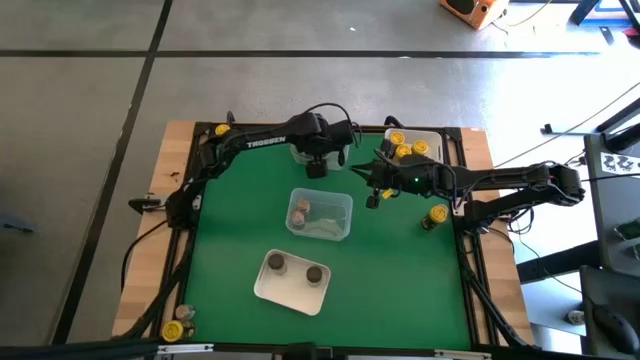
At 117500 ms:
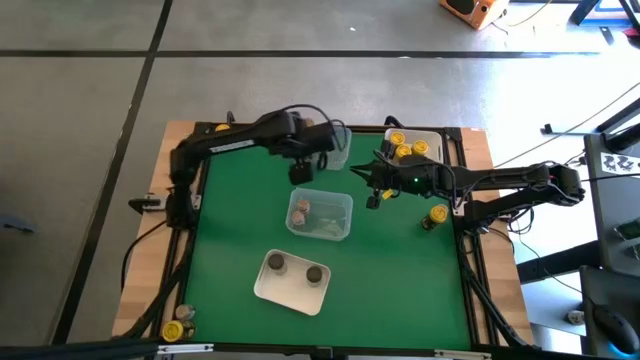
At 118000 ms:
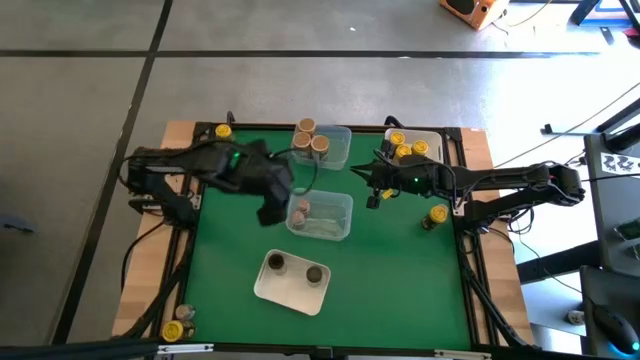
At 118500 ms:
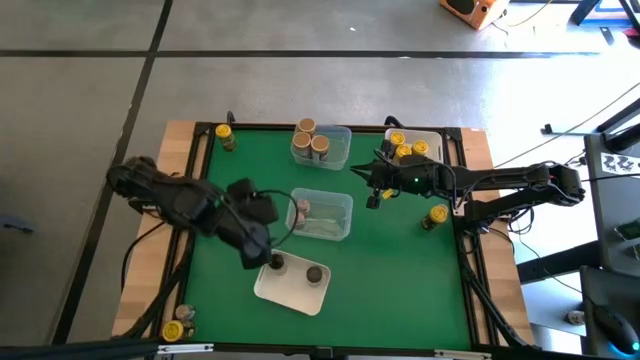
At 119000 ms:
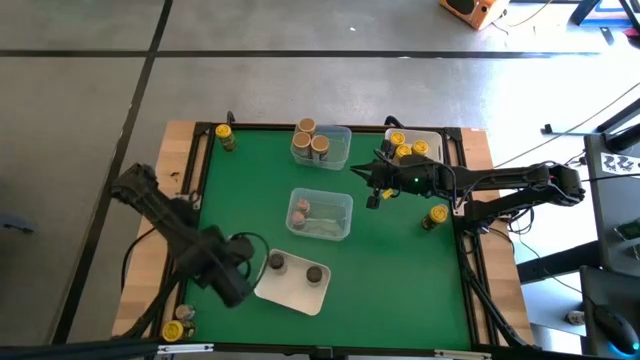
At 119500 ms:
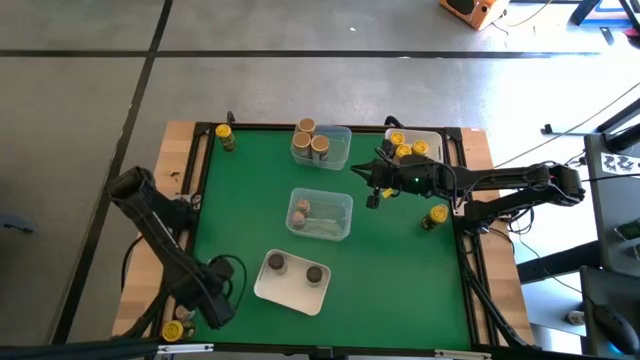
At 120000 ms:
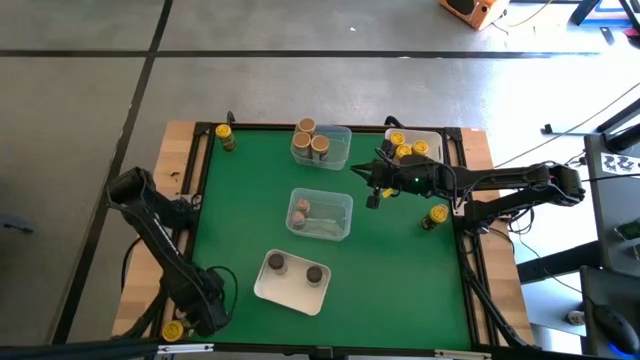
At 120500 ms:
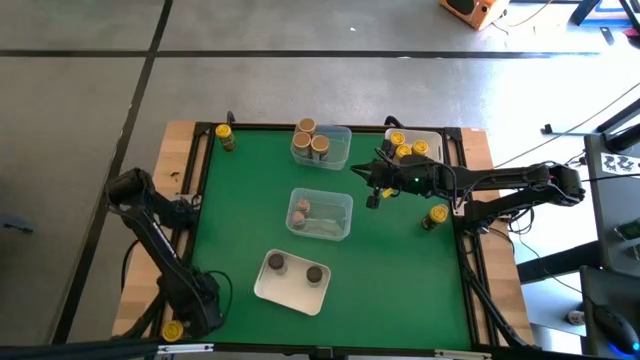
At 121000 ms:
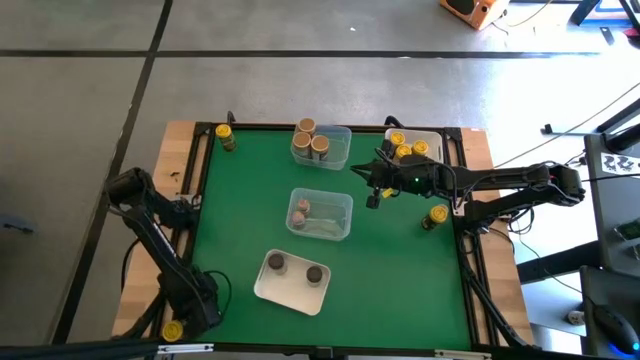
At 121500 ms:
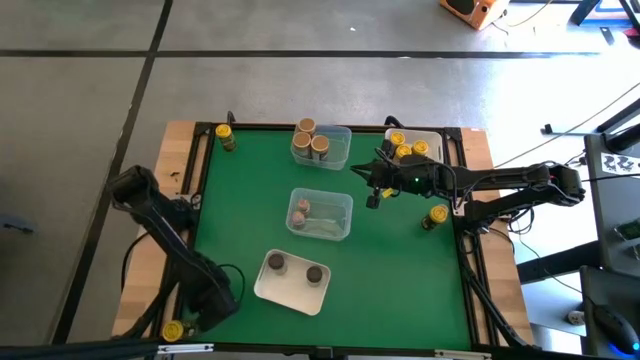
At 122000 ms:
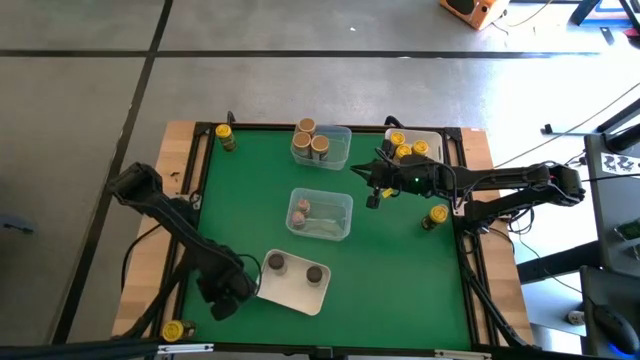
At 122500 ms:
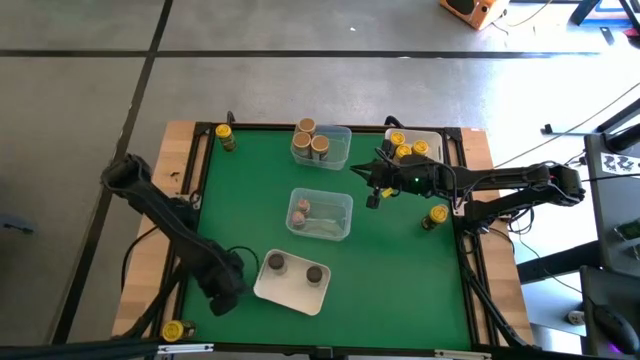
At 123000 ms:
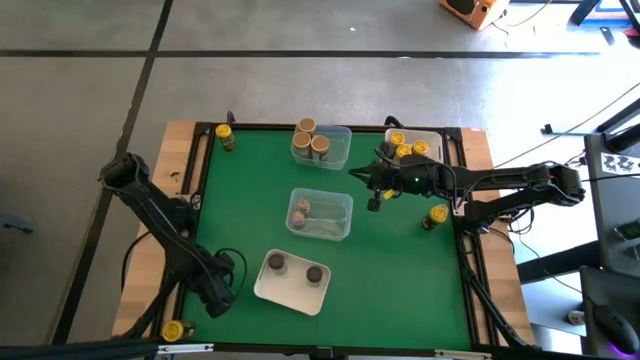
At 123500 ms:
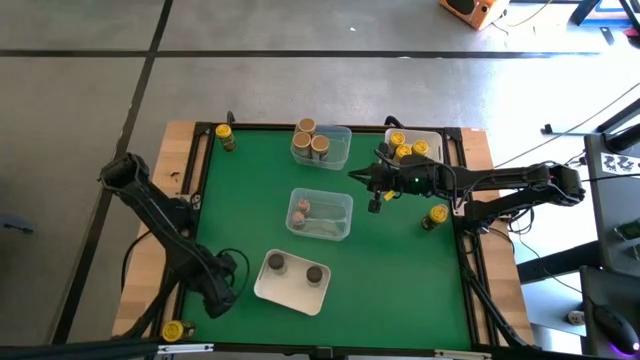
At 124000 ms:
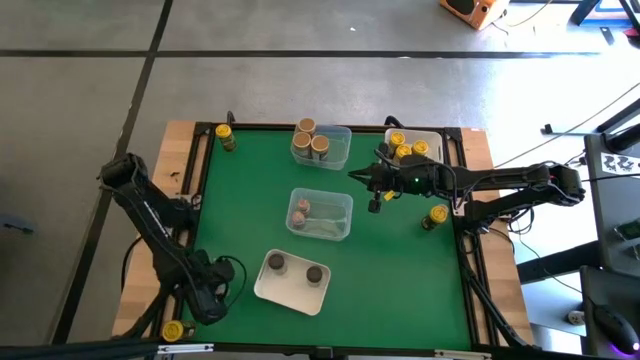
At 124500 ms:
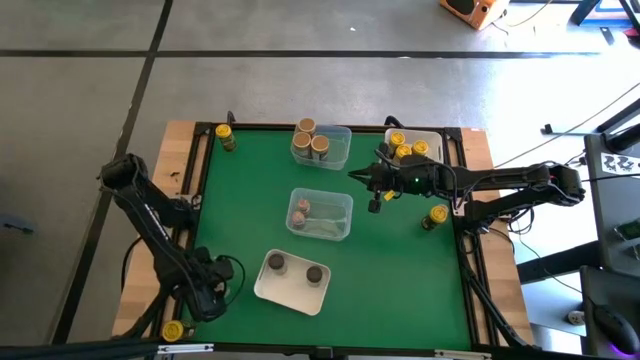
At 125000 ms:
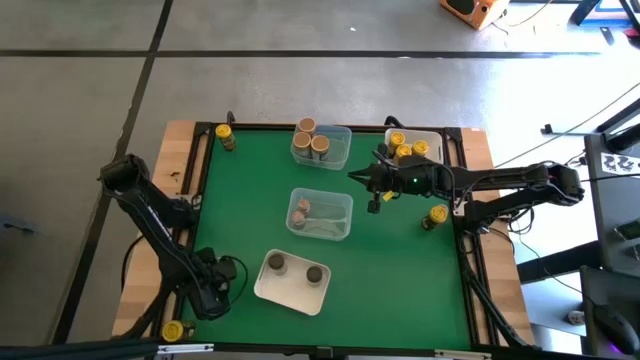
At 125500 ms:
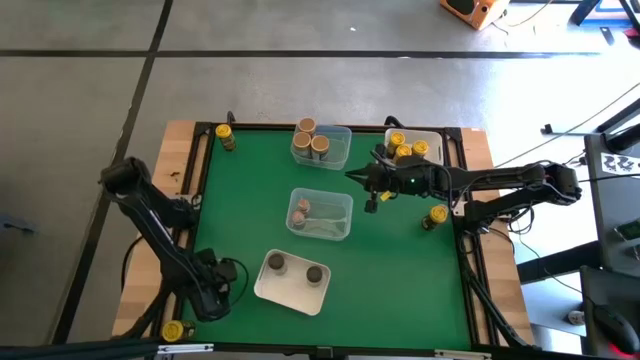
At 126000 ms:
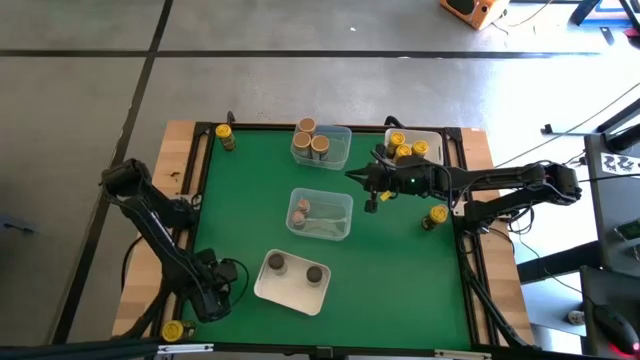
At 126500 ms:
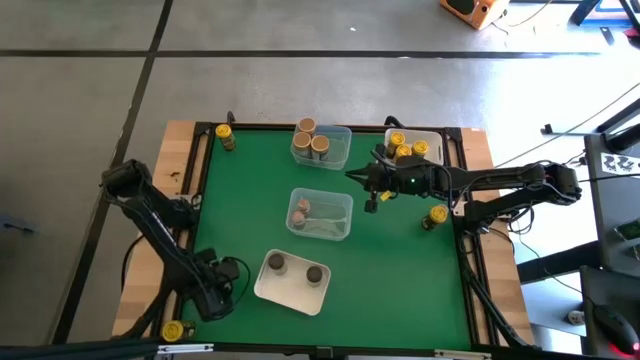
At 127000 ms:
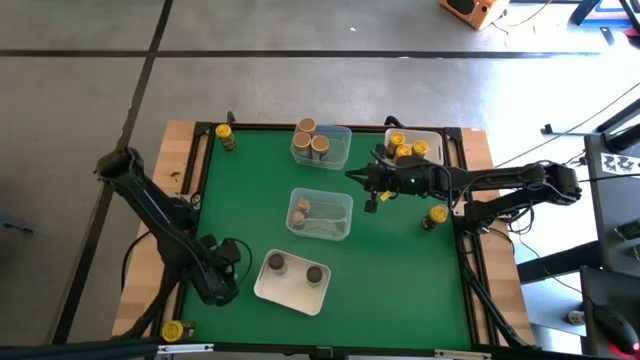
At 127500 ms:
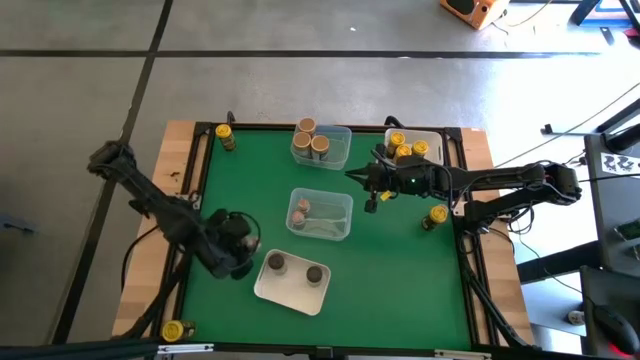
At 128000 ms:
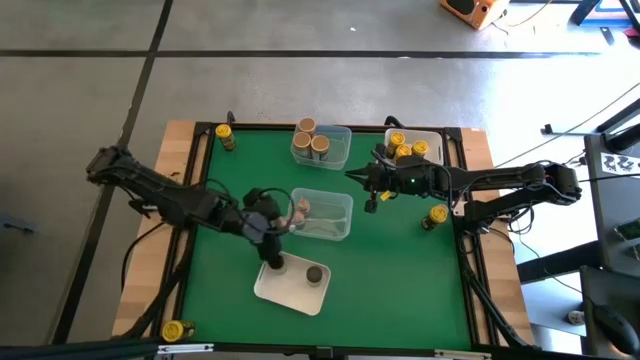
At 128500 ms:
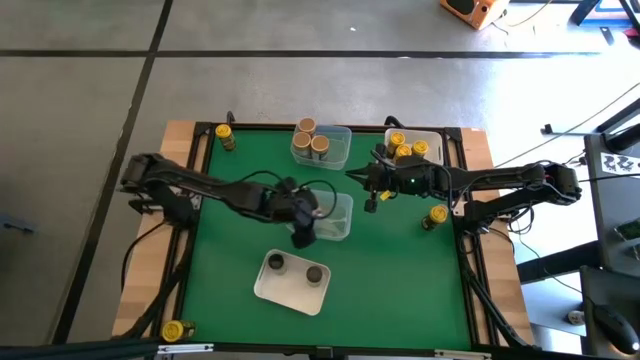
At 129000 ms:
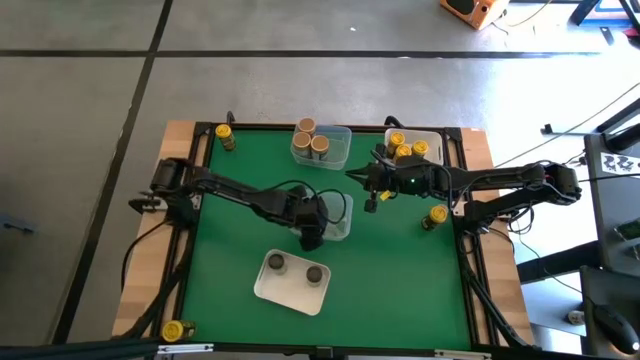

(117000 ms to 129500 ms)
Task: Sort spices by type
Put the light brown seasoning bottle into the bottom transparent bin

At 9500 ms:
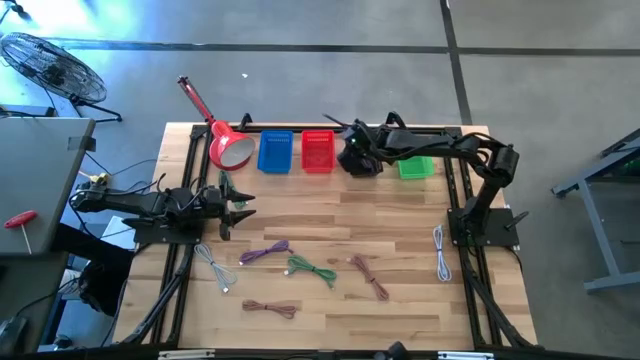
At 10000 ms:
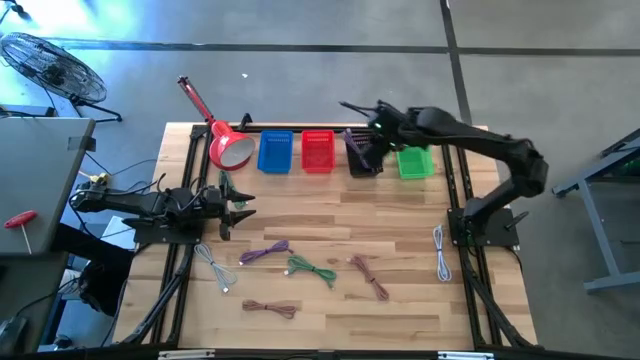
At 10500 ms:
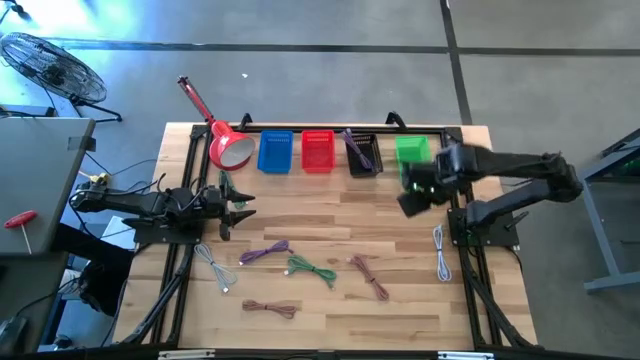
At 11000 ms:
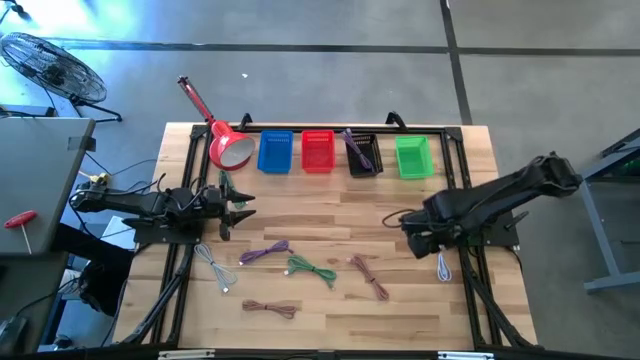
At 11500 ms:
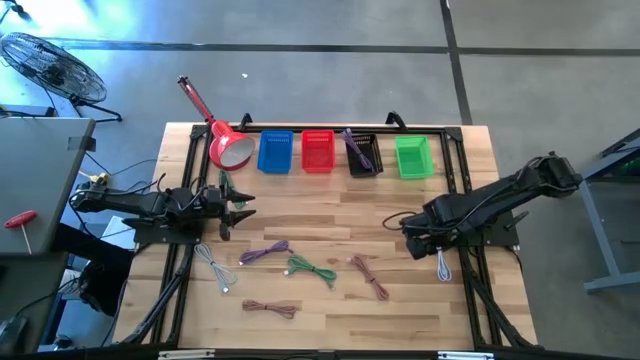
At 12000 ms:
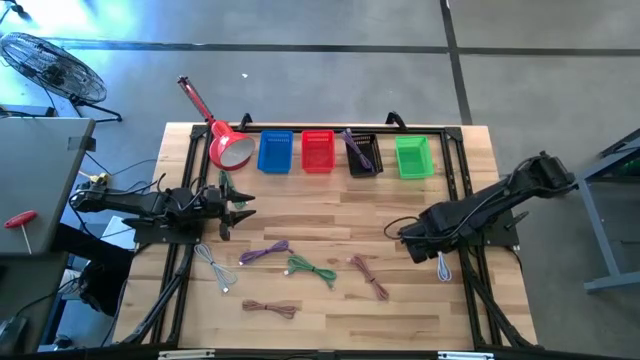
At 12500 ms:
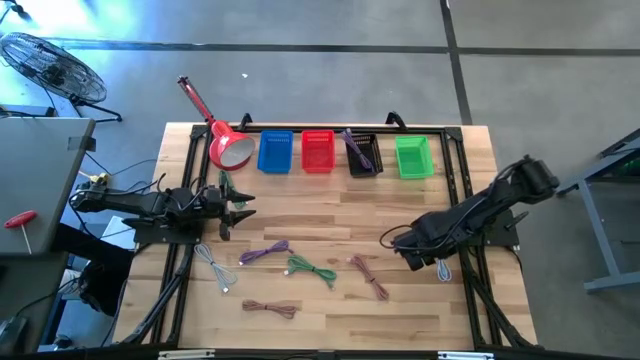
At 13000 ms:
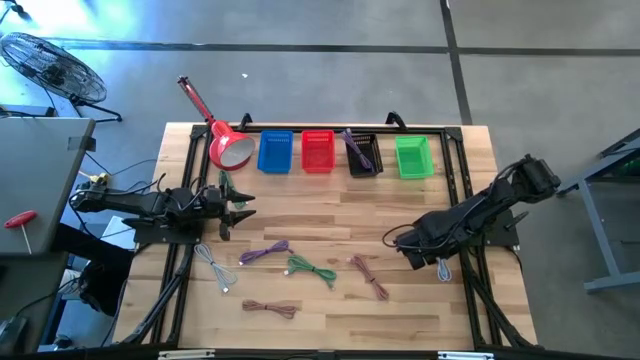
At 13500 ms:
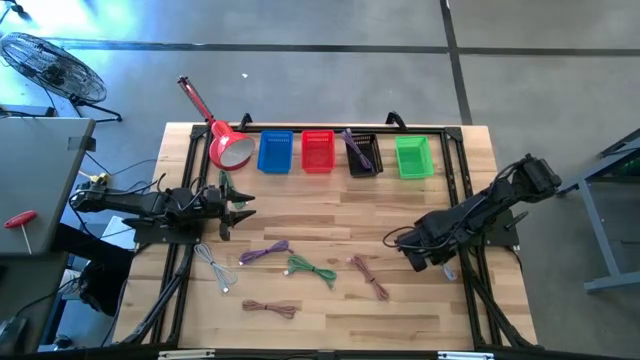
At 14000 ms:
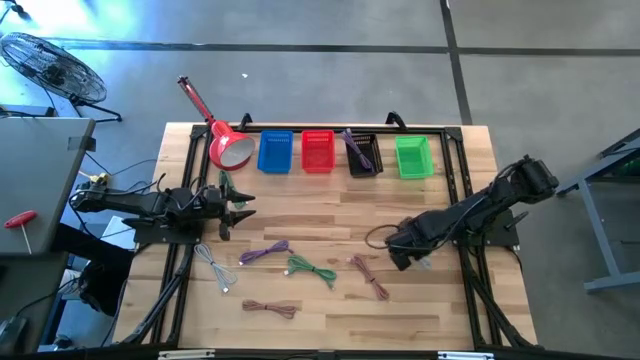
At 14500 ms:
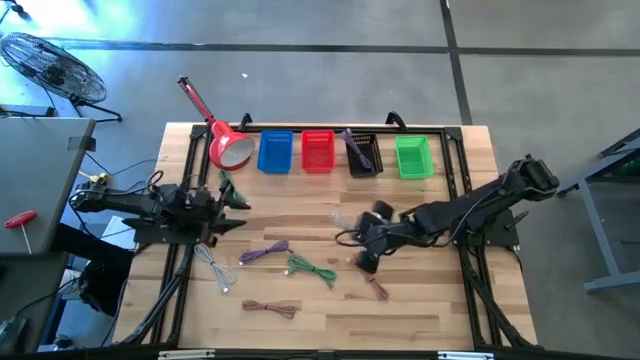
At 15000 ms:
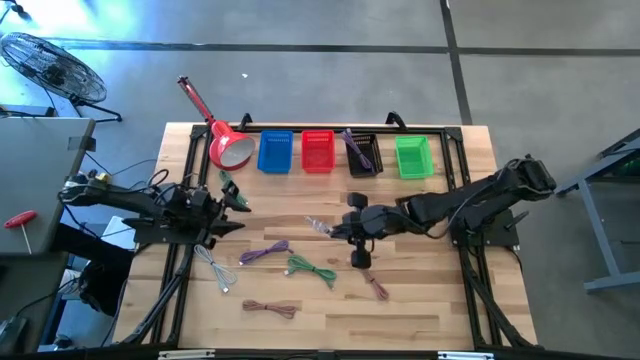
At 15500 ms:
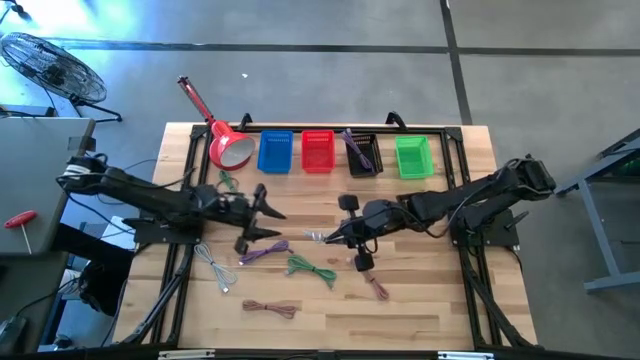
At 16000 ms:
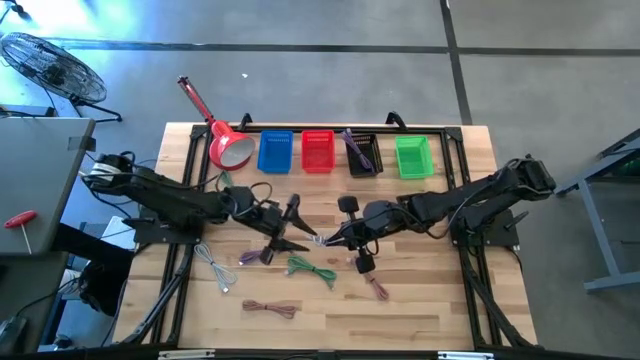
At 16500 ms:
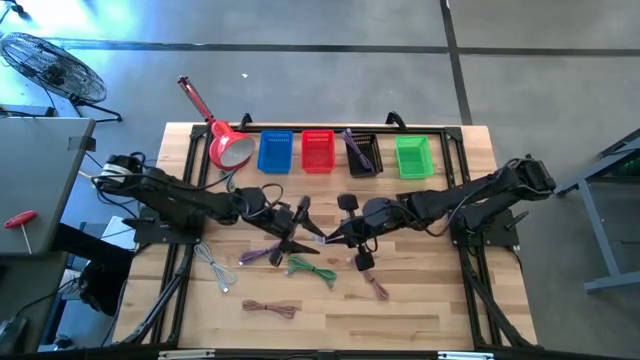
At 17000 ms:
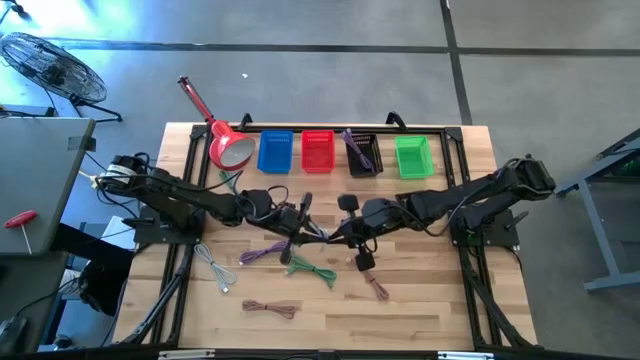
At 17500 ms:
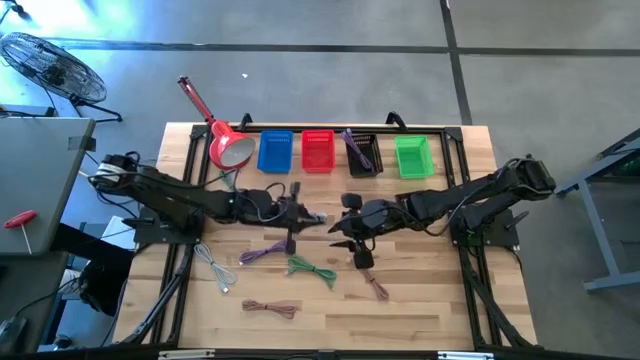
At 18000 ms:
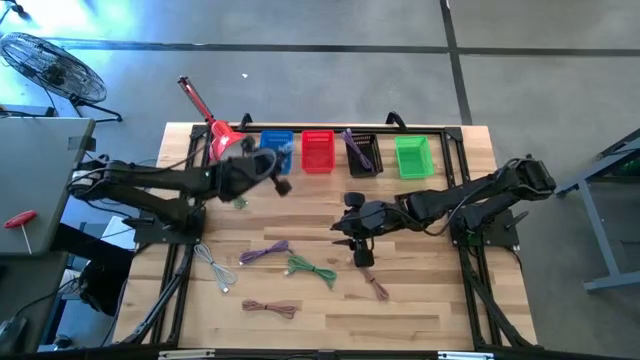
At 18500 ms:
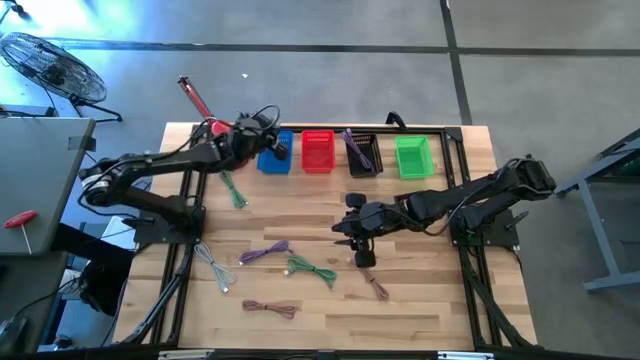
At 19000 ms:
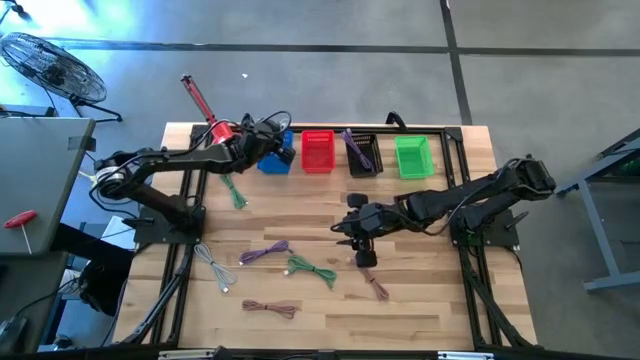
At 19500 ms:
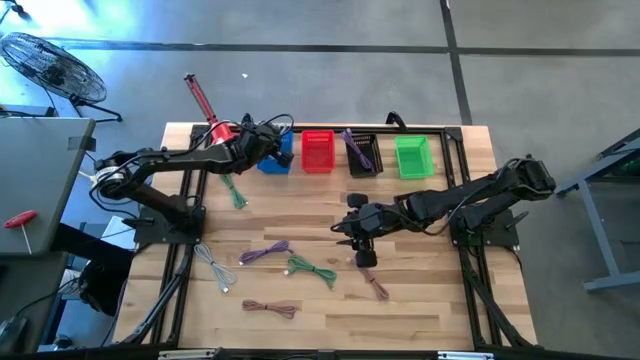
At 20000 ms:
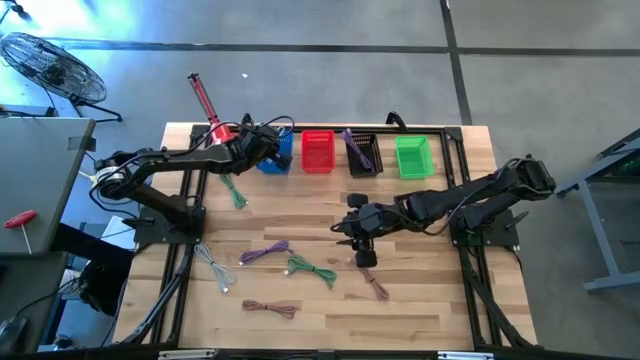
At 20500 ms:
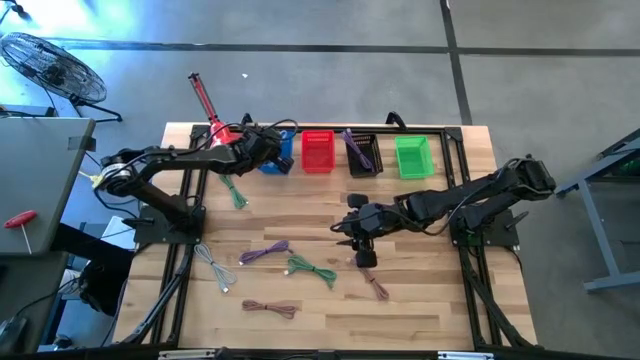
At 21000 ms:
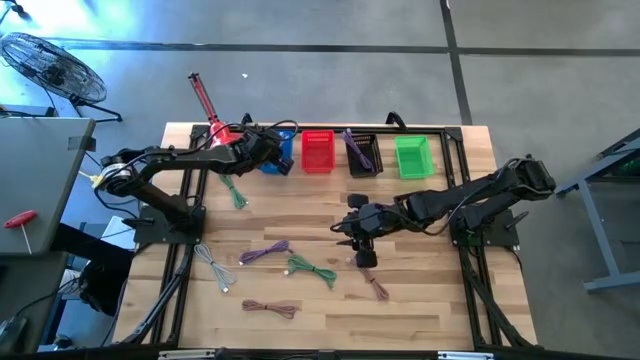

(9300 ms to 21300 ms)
Task: Pick & Place USB Port
Put the right blue charger cable into the blue bin
